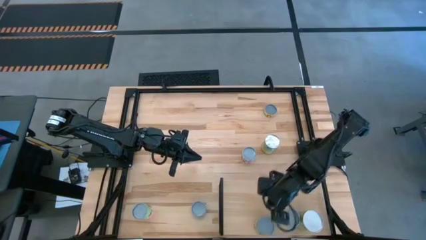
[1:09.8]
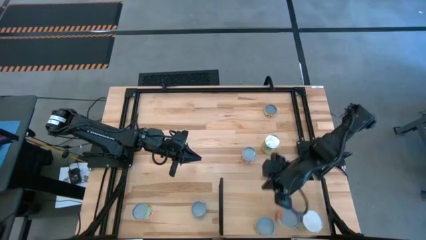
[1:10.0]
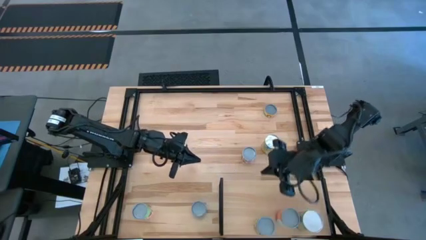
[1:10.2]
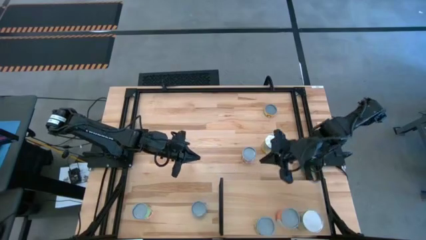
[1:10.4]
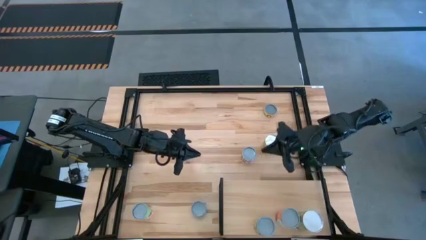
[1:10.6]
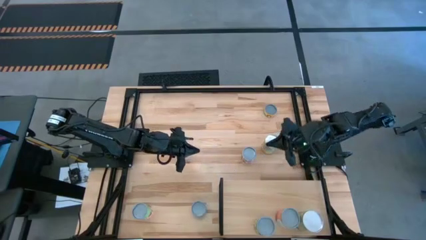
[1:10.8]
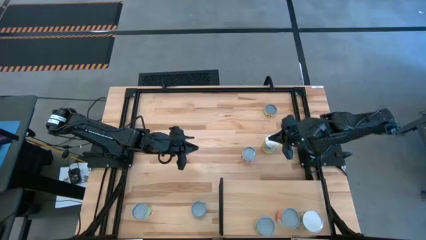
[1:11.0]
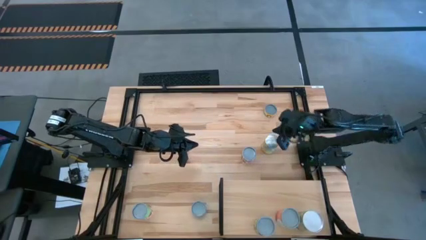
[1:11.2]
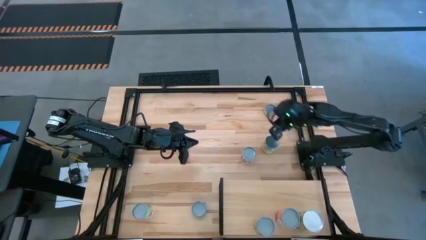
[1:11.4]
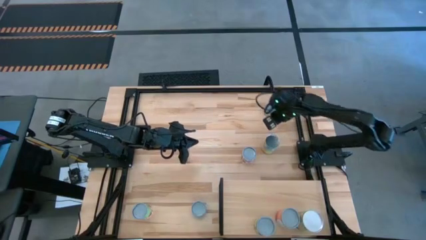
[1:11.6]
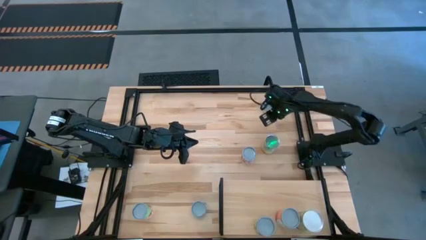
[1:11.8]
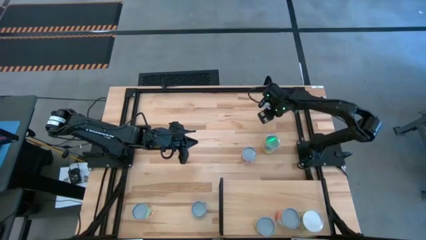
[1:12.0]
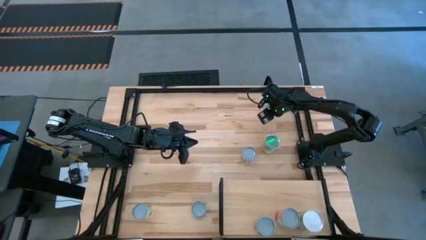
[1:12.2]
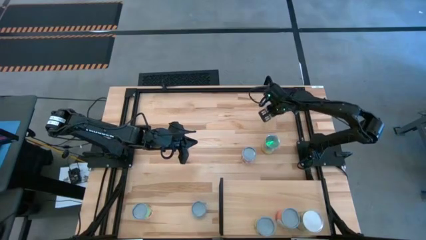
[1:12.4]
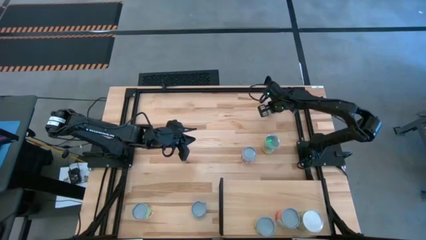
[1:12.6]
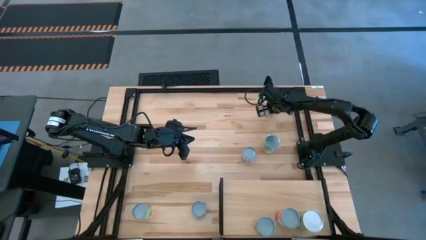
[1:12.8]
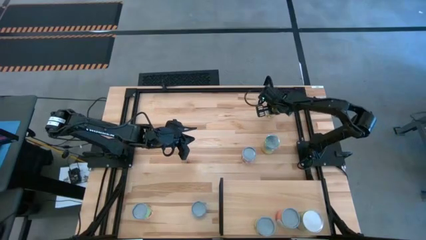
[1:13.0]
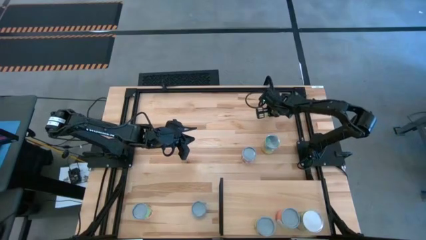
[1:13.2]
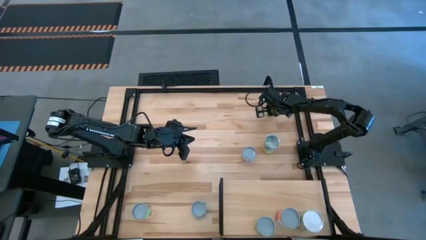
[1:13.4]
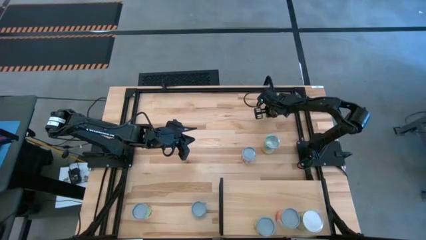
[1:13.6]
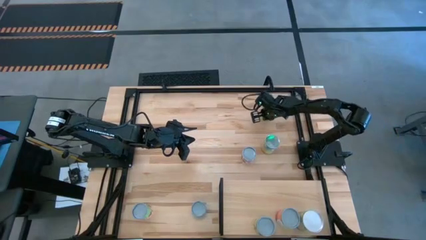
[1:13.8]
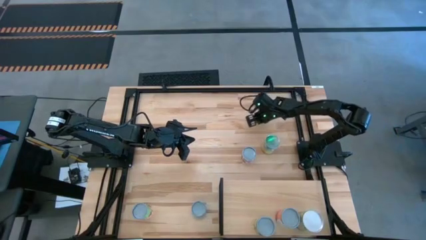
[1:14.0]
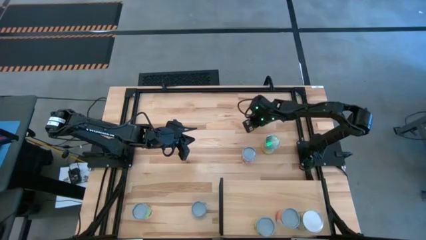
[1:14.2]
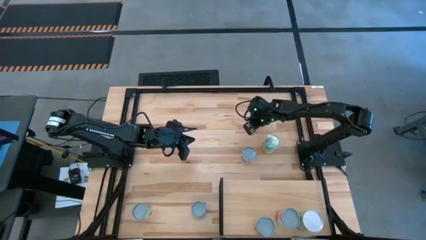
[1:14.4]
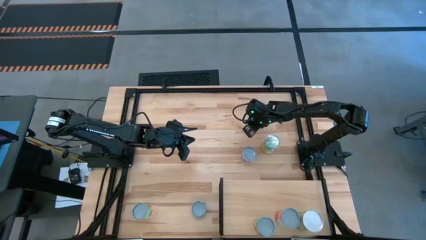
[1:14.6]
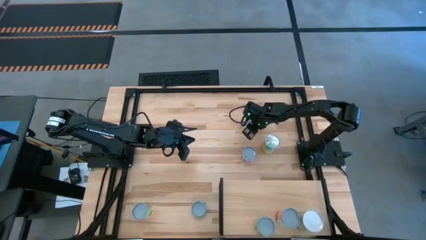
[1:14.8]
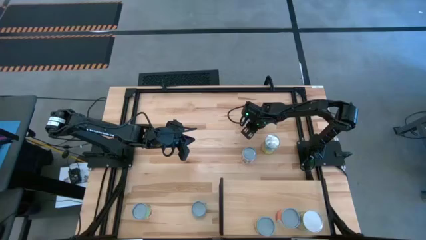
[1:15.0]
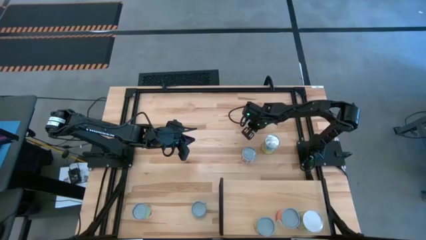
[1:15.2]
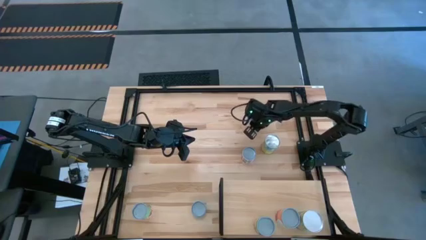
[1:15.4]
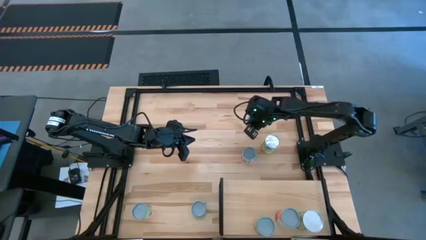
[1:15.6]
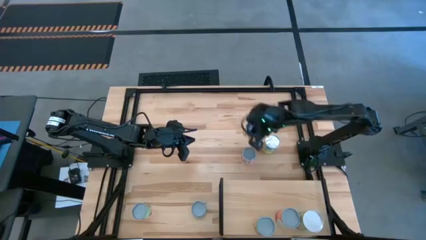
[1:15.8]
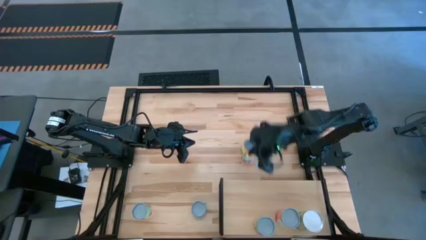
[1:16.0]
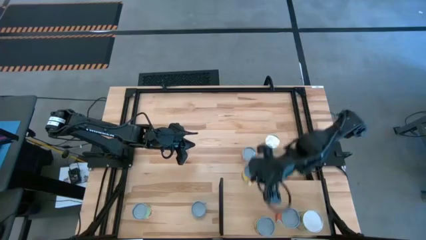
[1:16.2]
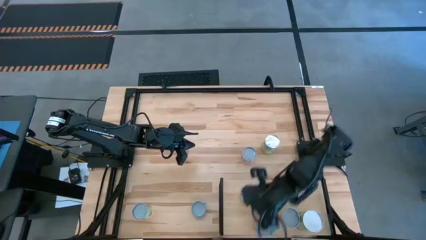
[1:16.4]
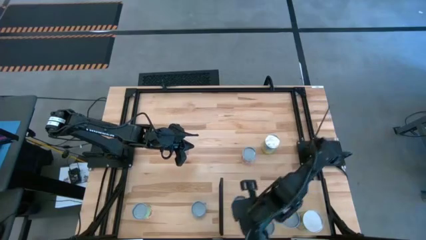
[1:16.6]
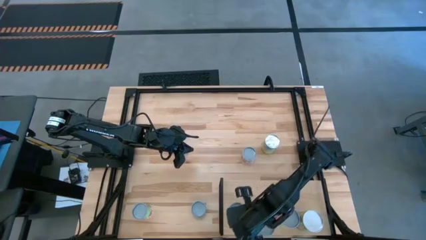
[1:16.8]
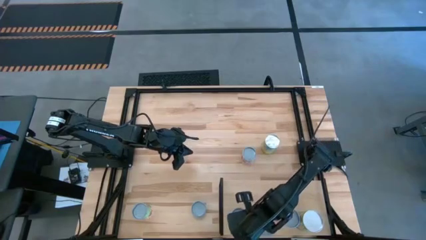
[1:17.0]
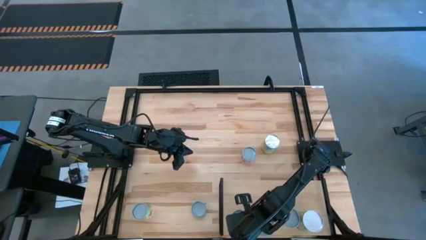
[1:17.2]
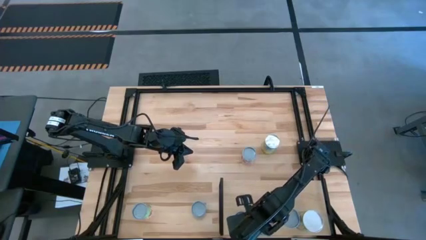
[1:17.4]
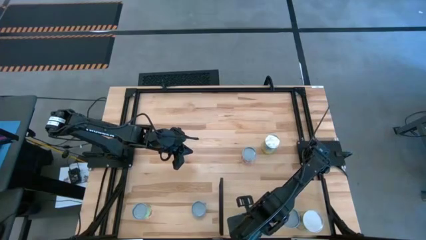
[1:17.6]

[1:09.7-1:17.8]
Task: Pick and place cans onto a shelf
Put the canned pineapple onto the shelf

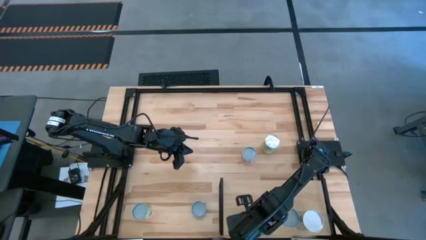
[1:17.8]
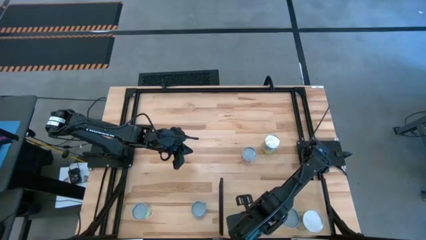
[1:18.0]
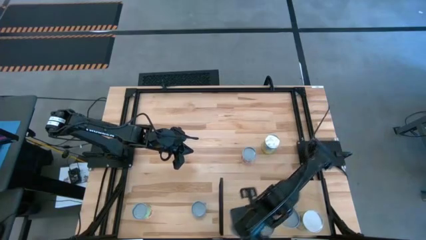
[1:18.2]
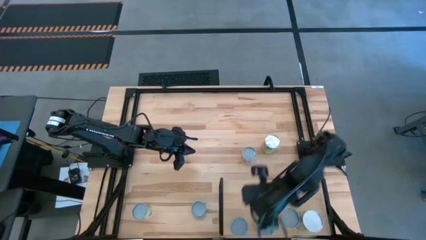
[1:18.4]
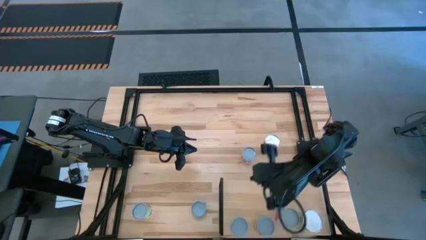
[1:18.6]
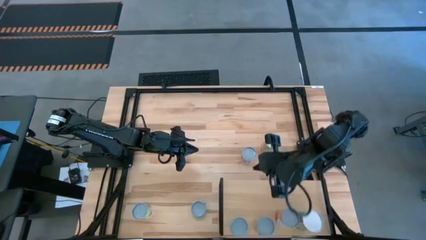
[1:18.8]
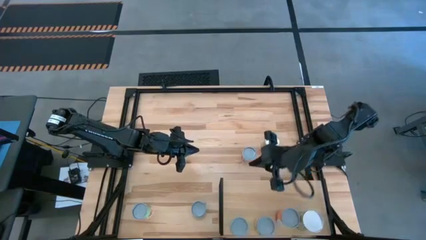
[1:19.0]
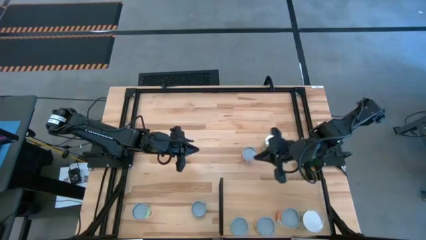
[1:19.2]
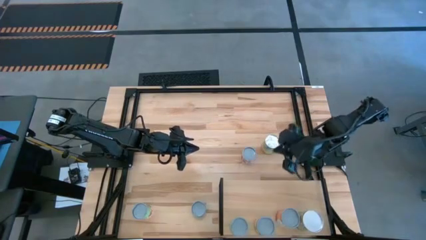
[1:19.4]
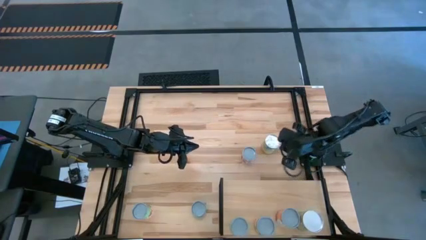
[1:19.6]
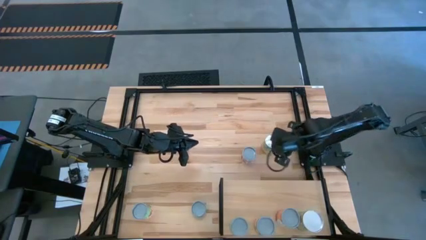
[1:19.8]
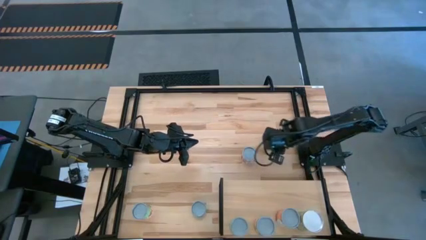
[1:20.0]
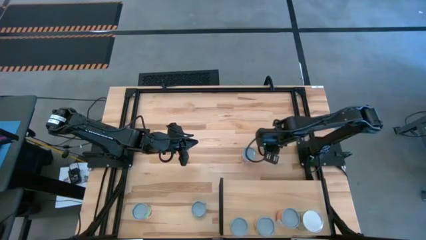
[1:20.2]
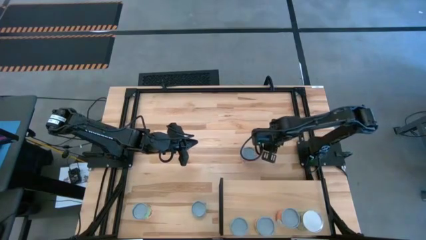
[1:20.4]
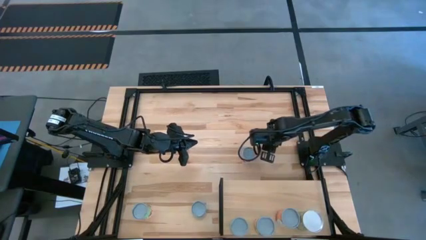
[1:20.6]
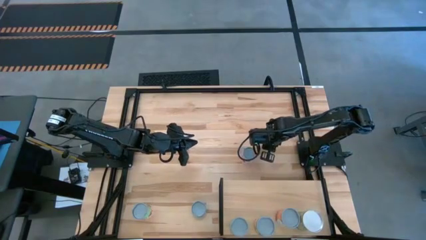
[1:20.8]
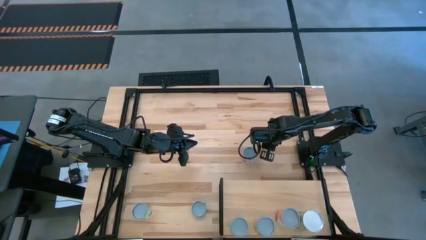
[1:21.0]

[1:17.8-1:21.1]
Put the small canned carrots on the shelf

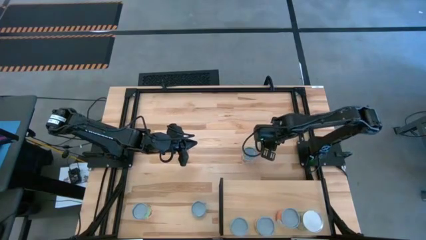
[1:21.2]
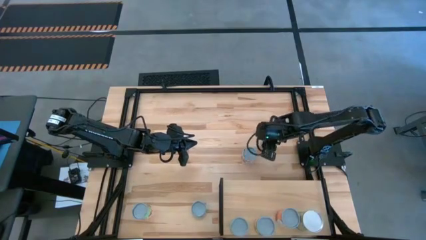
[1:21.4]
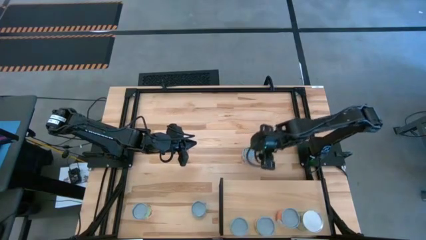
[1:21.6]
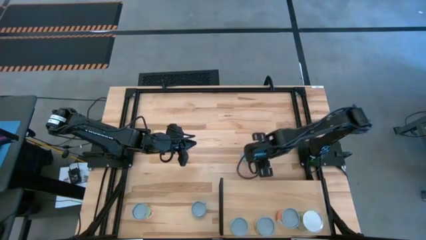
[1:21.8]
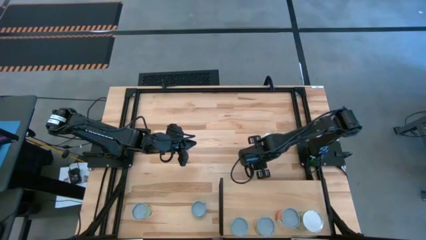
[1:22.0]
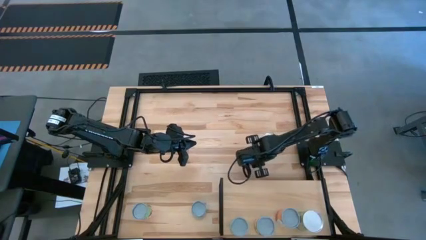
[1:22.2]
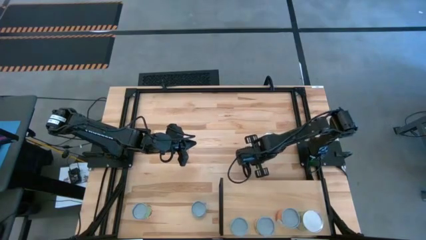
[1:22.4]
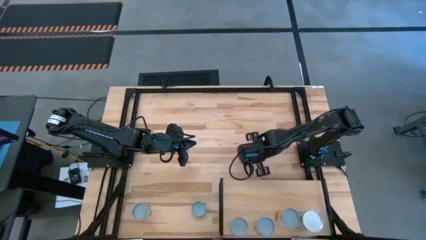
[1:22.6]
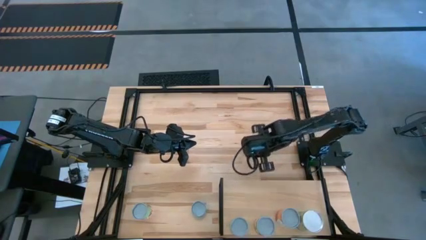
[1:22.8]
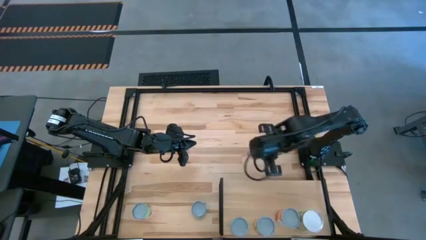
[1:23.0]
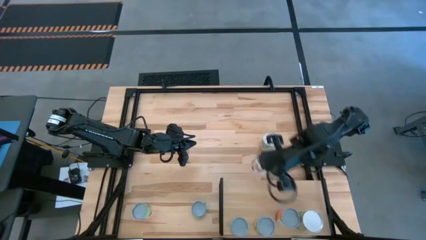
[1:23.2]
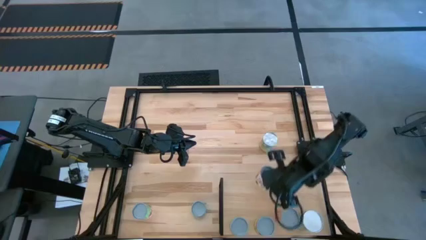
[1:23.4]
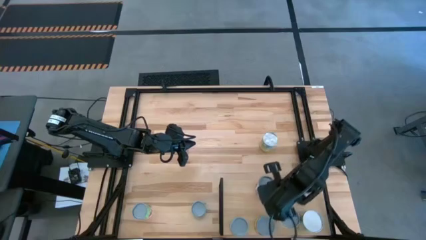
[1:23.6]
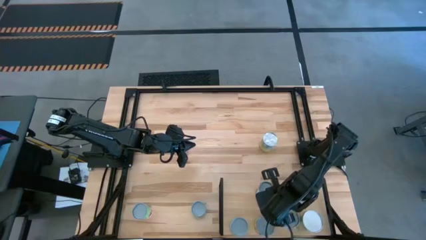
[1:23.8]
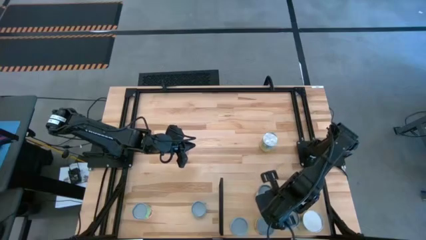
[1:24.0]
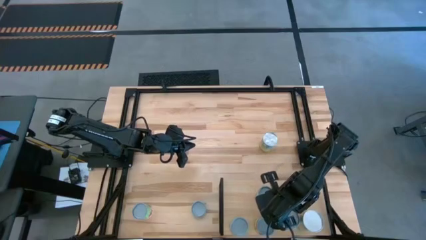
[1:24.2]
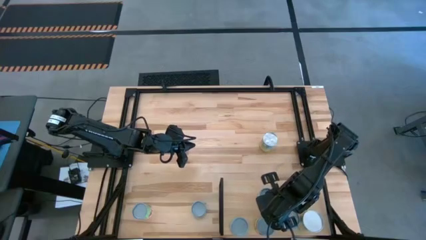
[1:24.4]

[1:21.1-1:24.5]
Put the canned tomatoes on the shelf

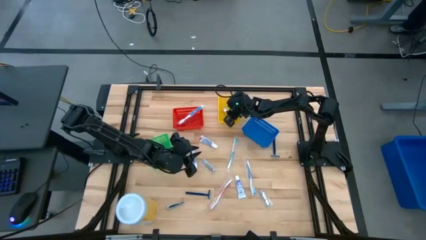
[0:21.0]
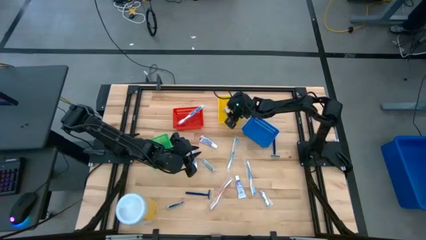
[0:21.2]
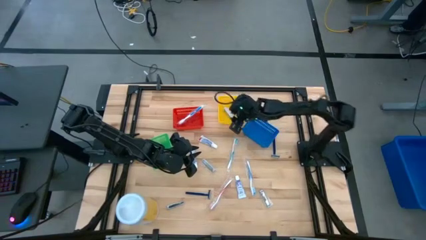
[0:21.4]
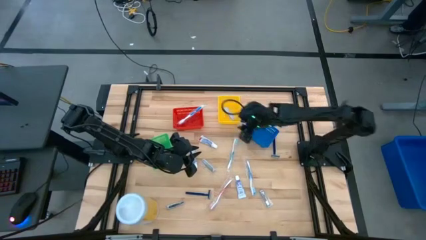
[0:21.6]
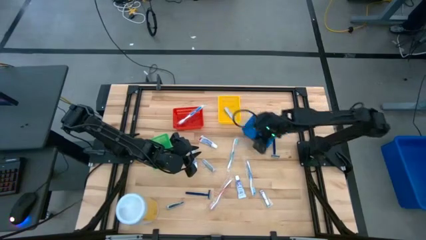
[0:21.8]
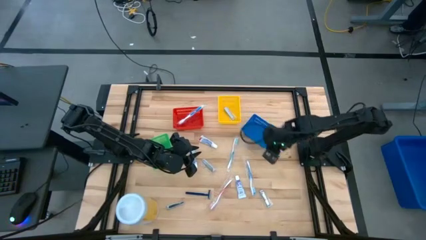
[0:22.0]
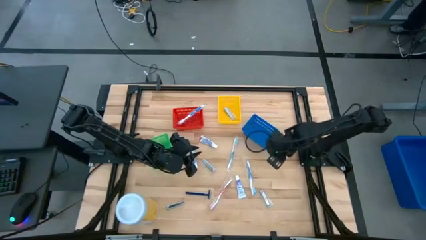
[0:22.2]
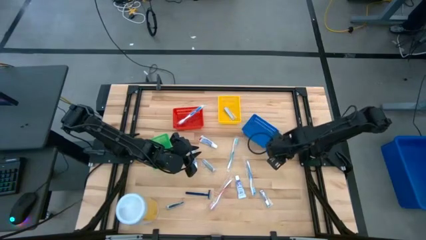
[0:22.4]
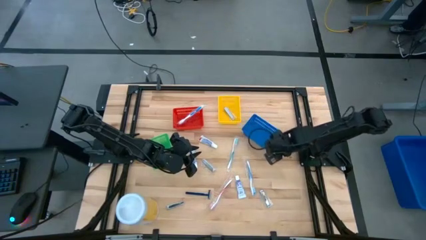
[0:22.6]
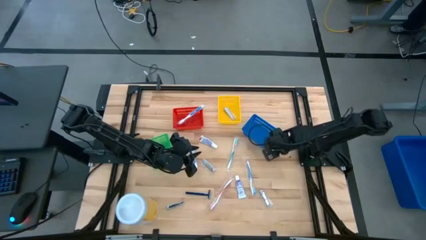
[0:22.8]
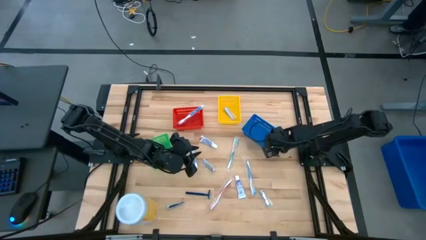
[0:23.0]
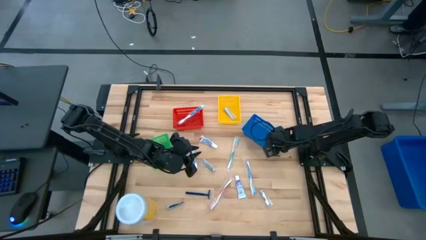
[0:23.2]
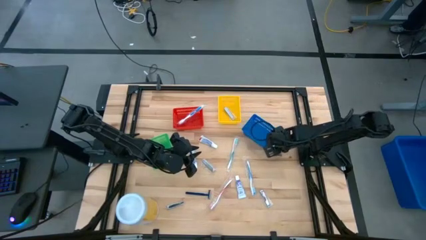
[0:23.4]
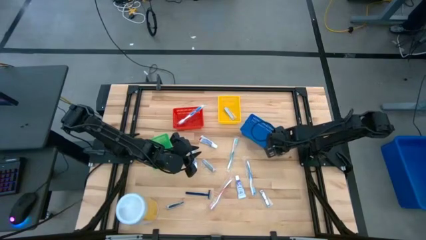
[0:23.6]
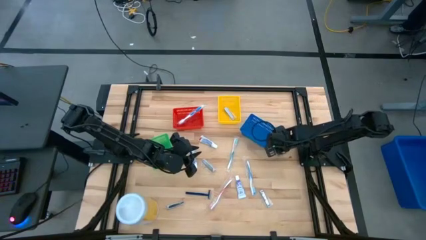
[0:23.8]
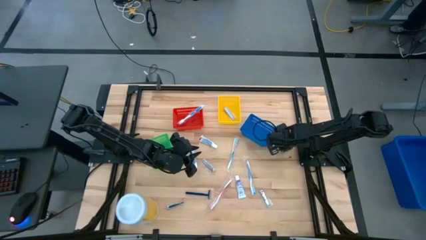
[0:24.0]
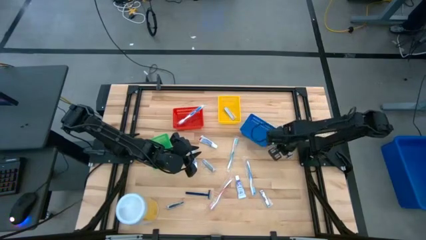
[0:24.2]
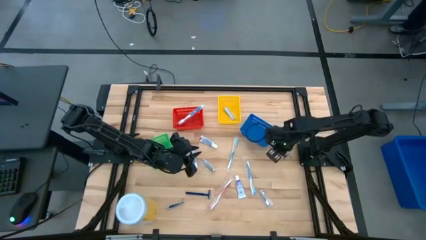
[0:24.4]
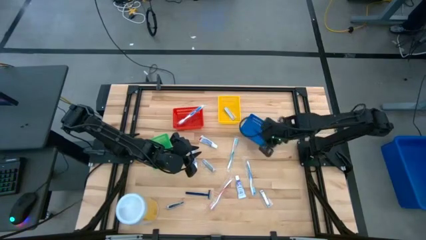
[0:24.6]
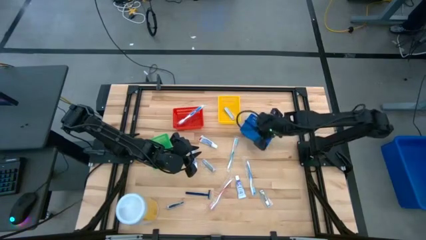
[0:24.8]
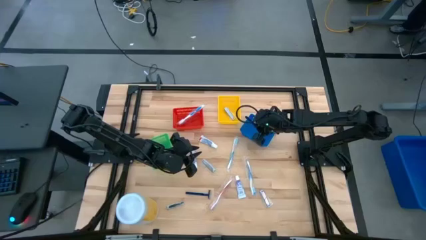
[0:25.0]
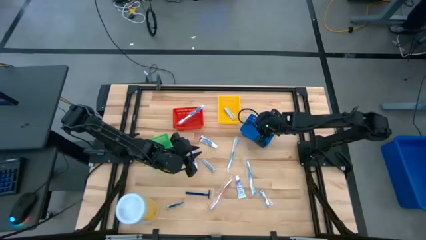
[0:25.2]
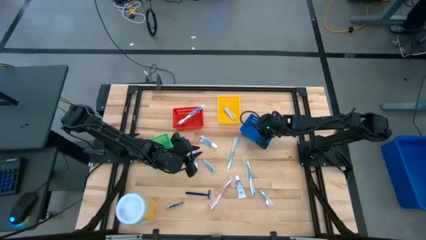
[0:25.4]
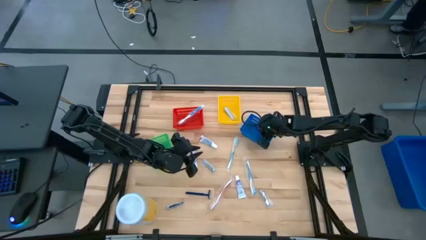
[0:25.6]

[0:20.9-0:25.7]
Task: Pick & Place Travel size toiletries
Put the blue razor into the blue bin
